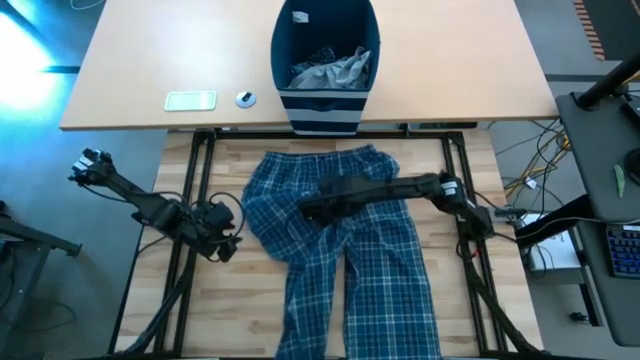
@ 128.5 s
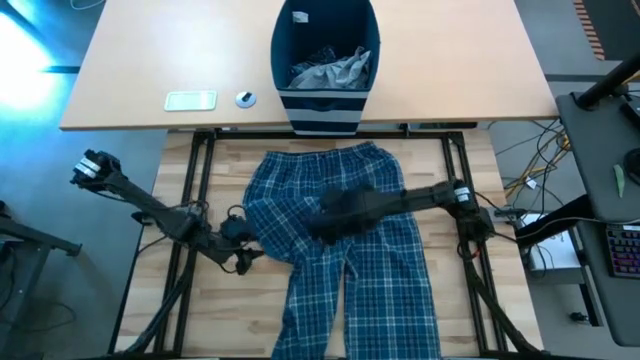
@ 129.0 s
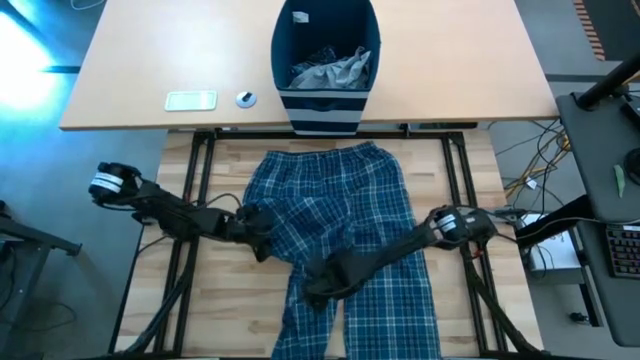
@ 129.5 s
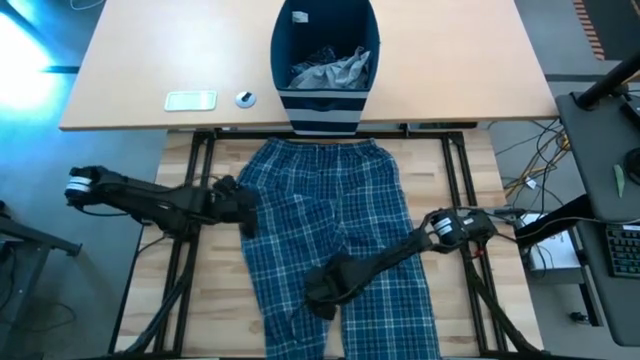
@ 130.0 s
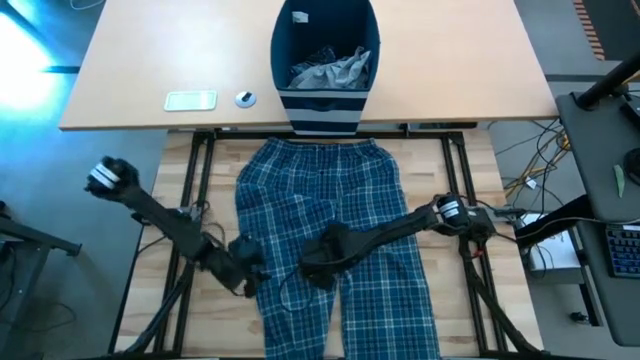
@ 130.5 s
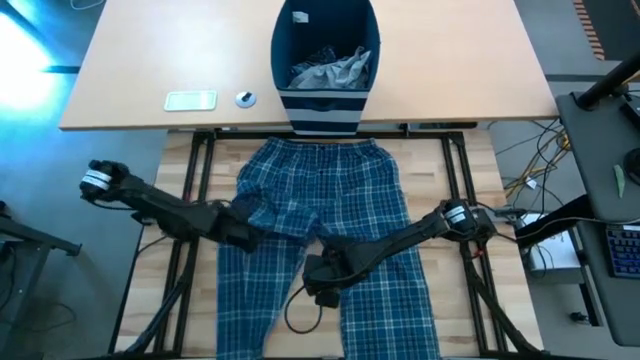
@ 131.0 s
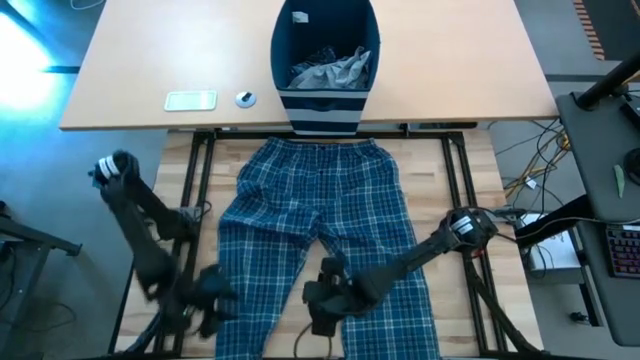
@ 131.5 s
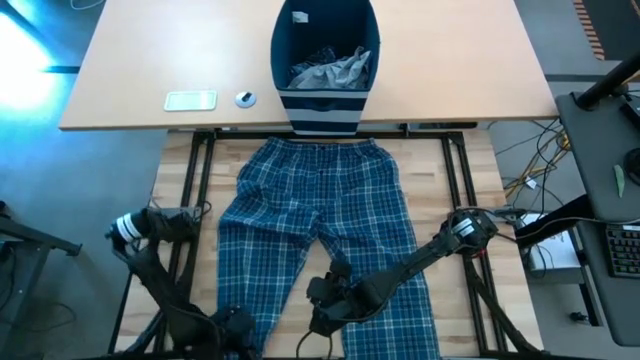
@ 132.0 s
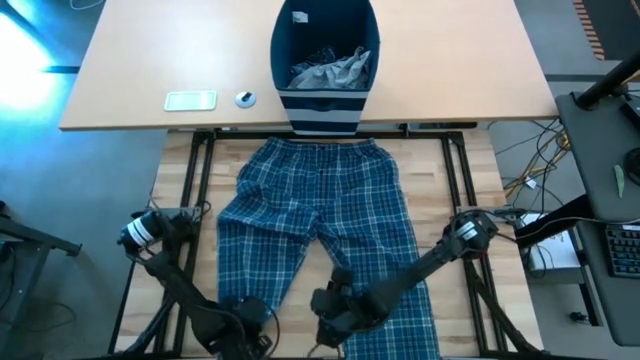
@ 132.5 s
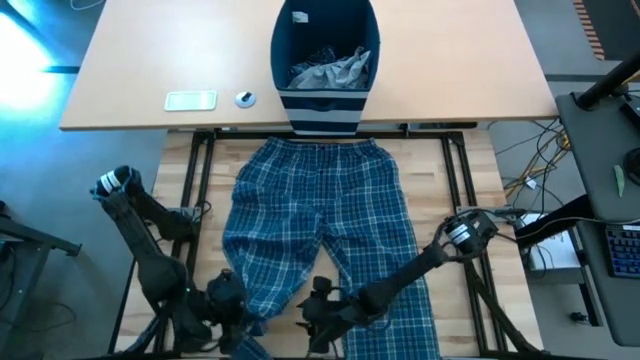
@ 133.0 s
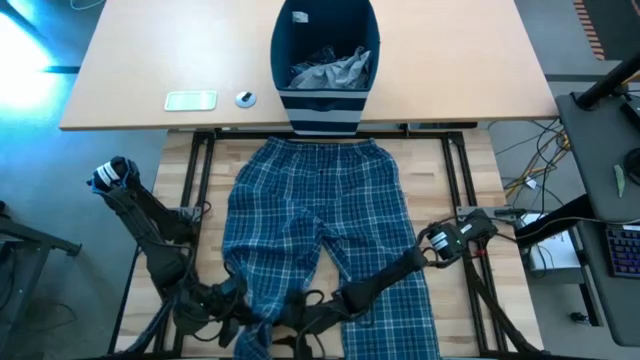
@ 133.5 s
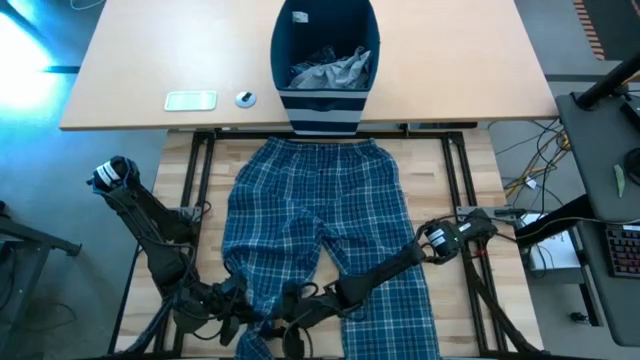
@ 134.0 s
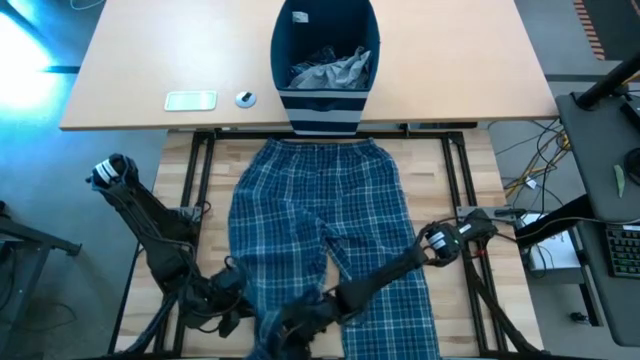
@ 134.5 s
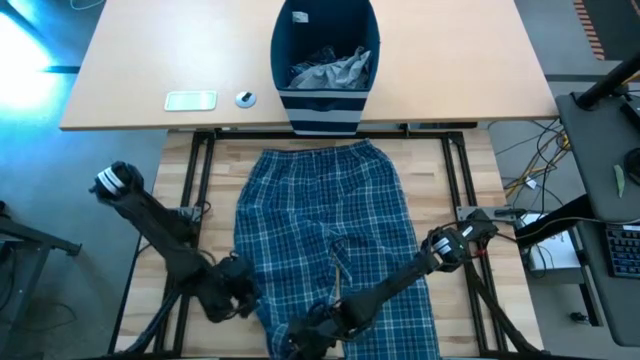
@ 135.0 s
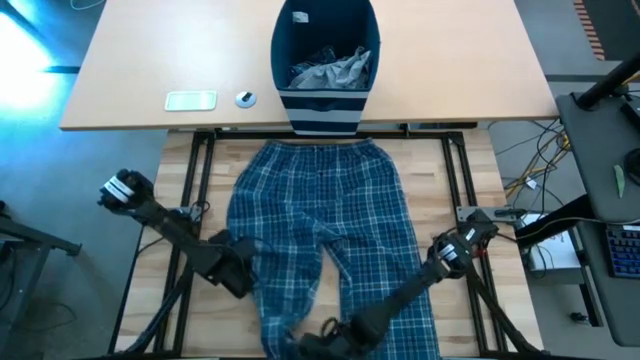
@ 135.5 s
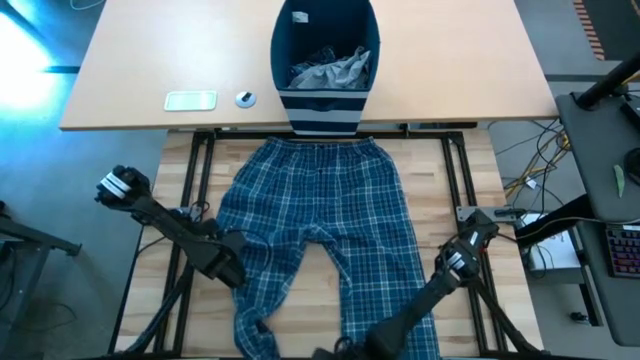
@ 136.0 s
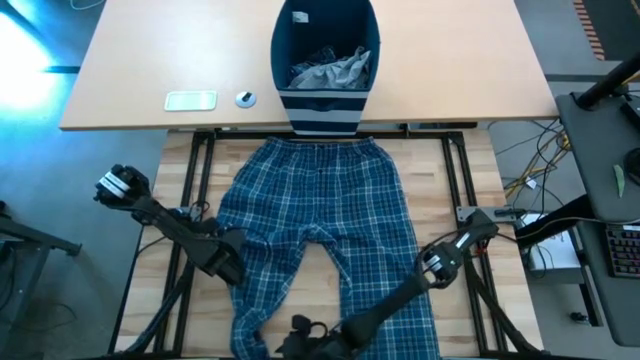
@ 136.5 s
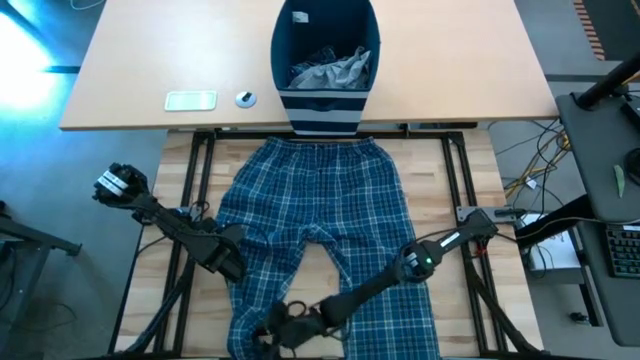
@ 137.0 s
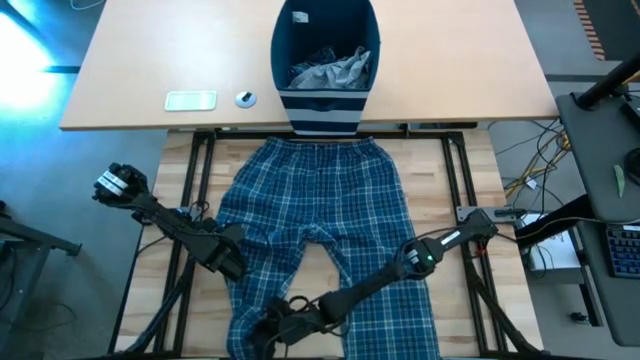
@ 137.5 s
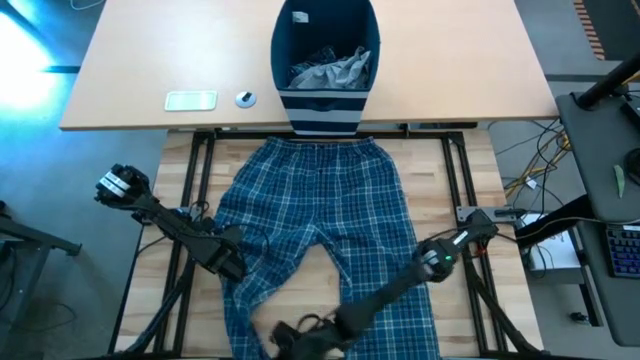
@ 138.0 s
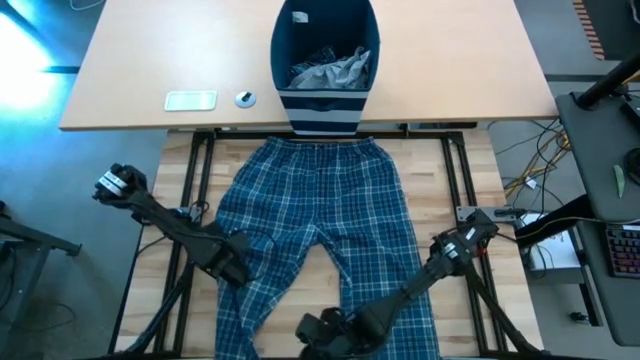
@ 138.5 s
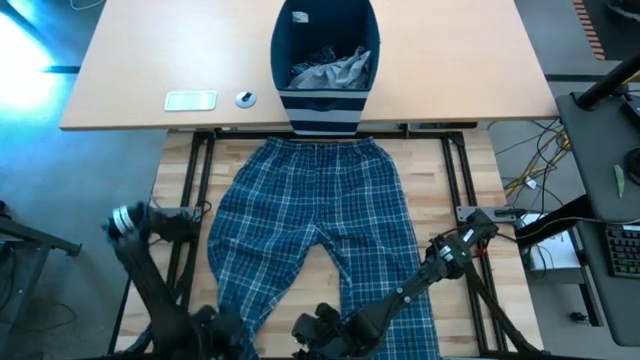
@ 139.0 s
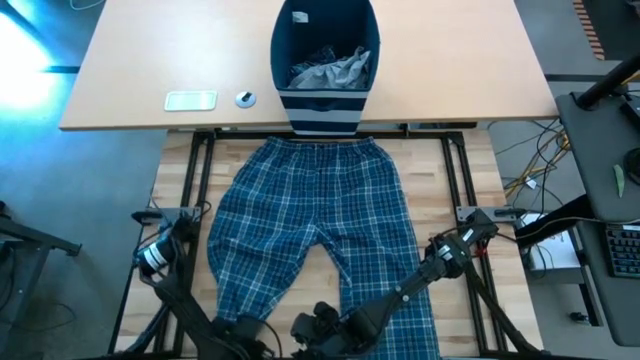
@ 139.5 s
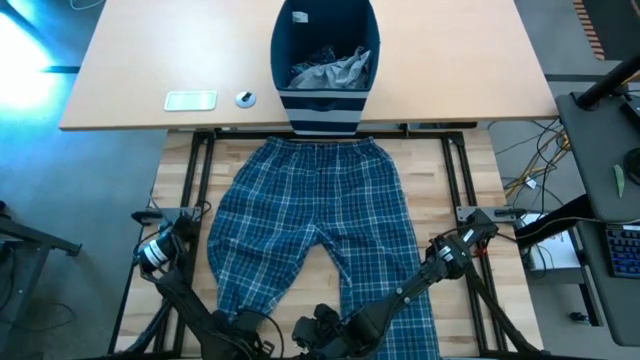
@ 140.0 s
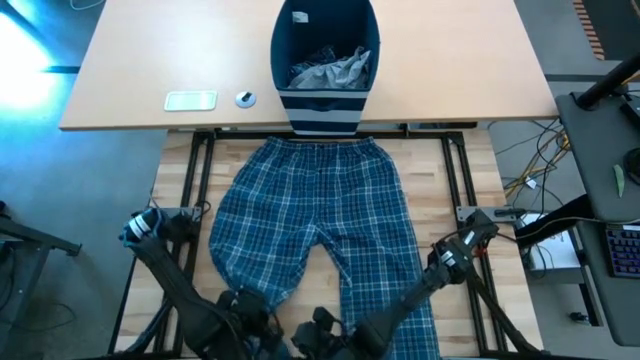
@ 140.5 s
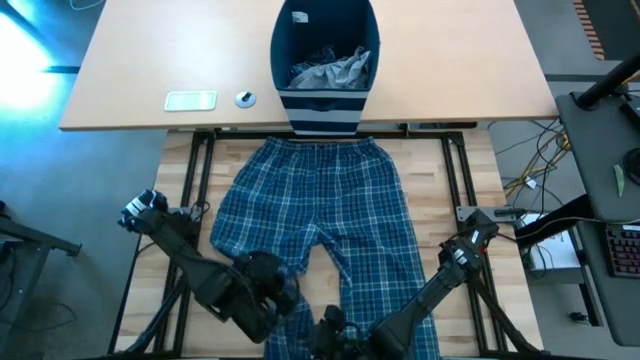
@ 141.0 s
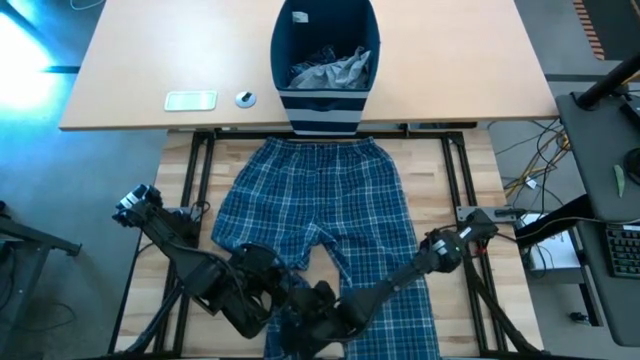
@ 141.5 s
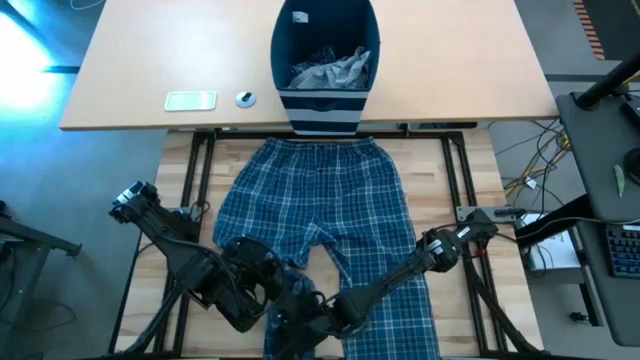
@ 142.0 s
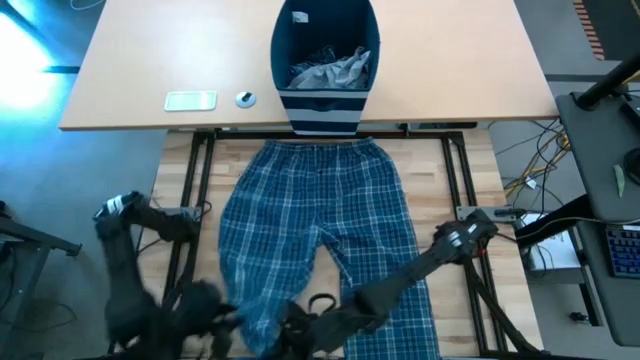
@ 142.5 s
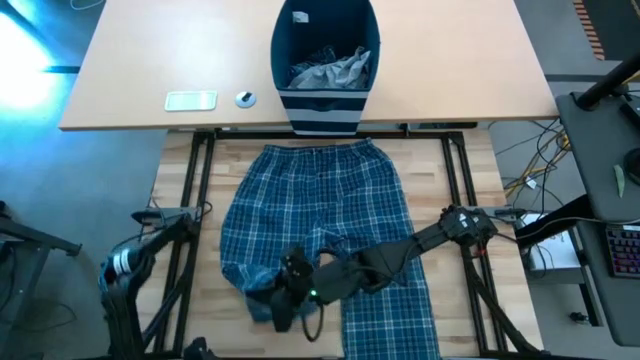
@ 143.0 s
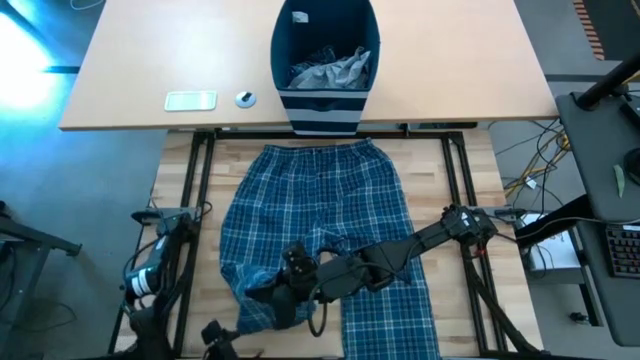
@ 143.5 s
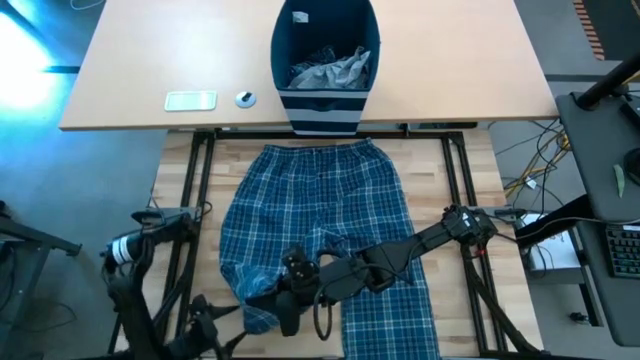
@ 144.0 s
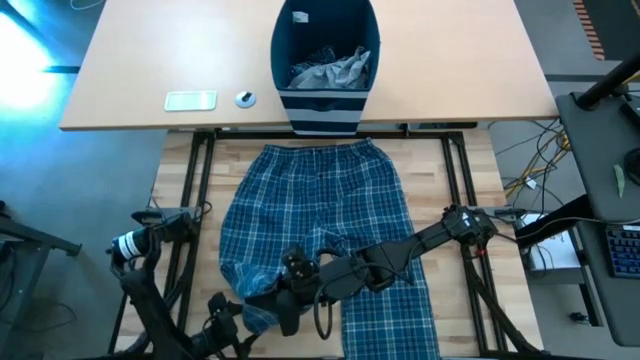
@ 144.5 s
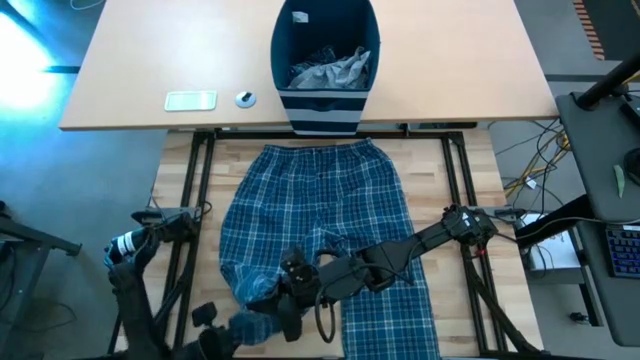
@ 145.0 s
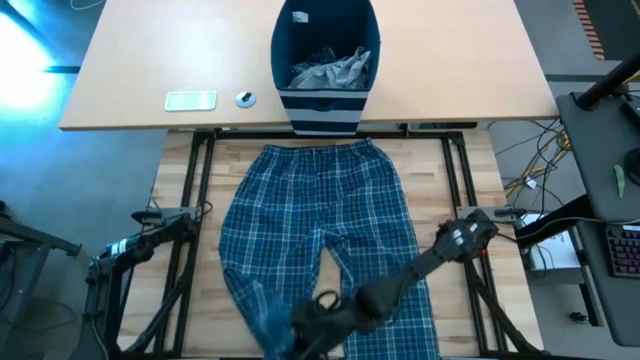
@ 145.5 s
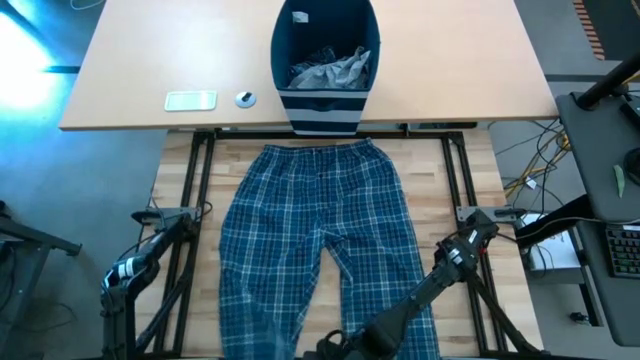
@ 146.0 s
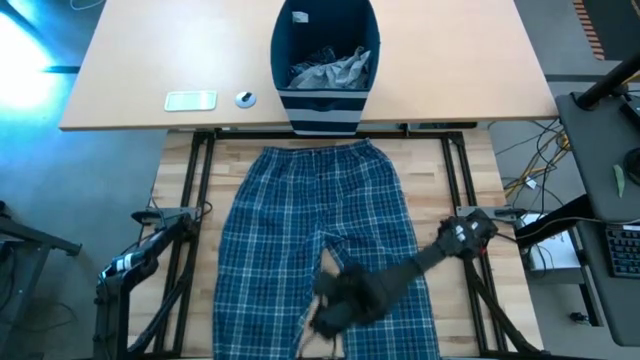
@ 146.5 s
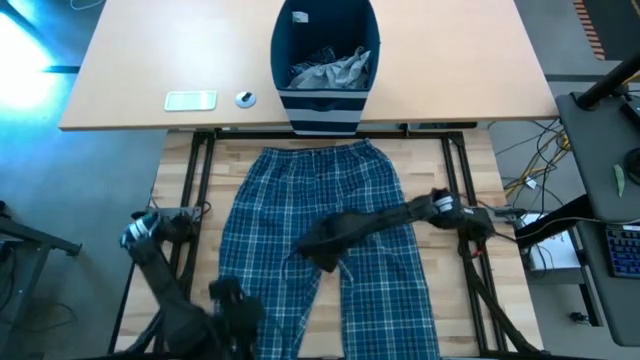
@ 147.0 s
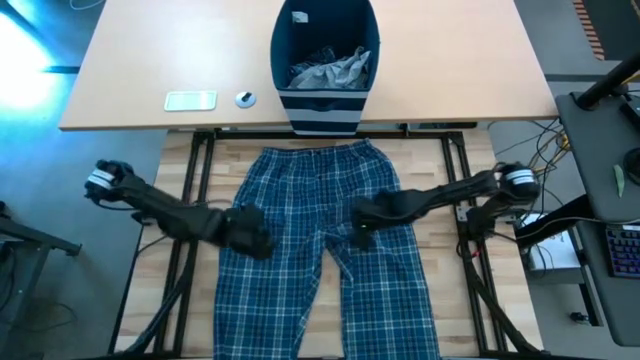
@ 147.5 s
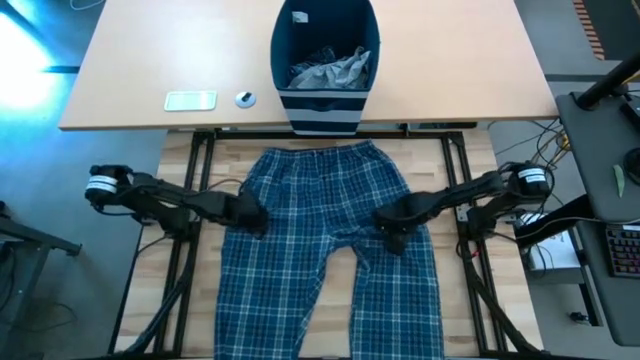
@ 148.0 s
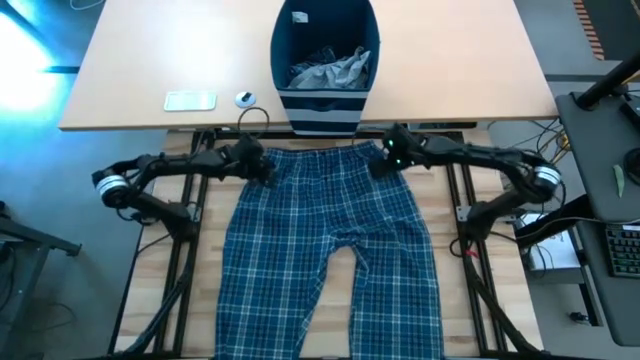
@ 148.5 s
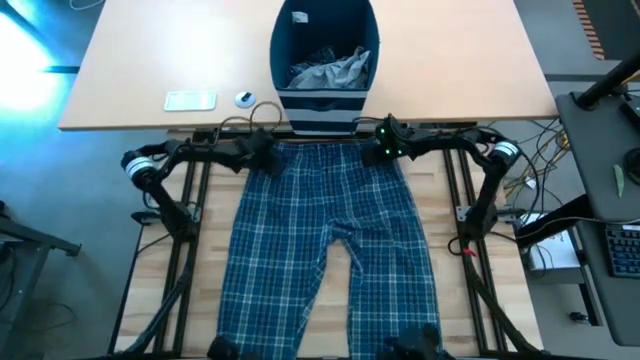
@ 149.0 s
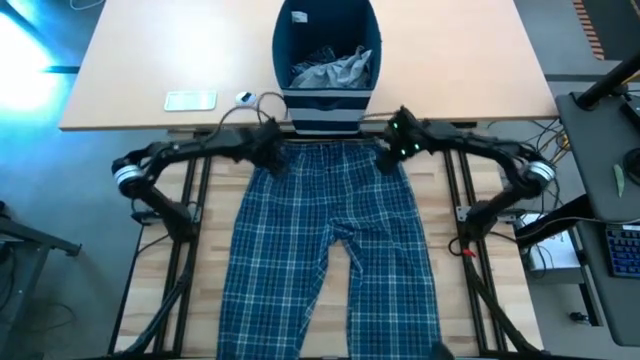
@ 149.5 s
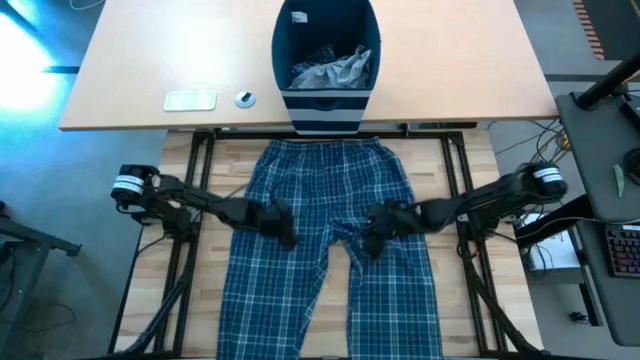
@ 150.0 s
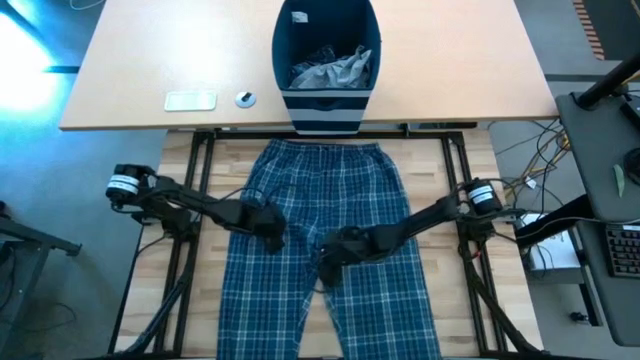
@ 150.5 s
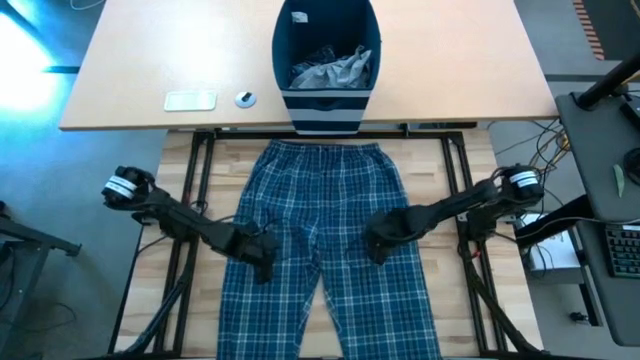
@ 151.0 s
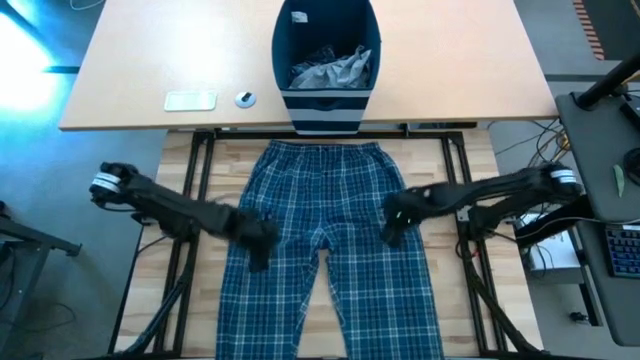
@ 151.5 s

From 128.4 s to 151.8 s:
Task: Fold Laundry from Bin
Fold the blue patterned pants
